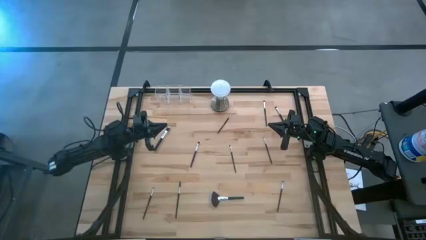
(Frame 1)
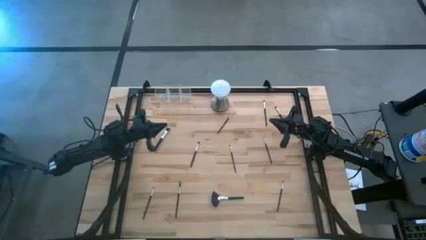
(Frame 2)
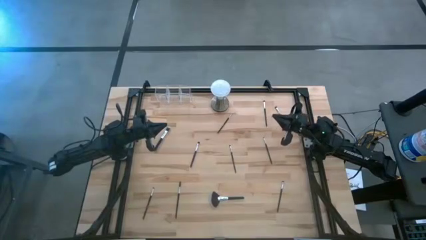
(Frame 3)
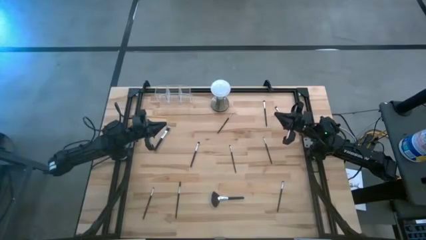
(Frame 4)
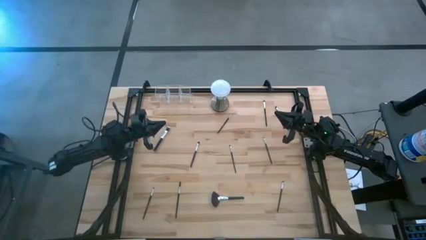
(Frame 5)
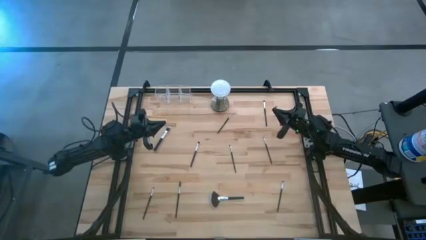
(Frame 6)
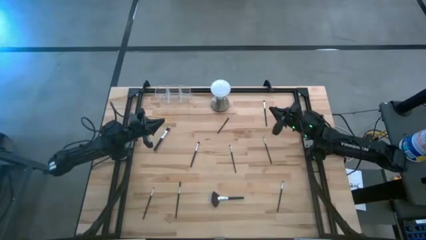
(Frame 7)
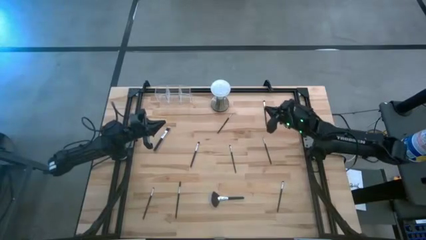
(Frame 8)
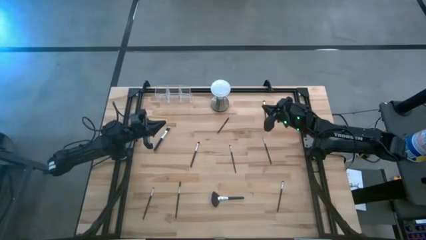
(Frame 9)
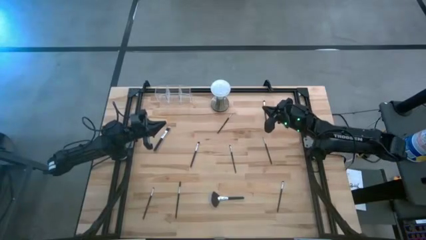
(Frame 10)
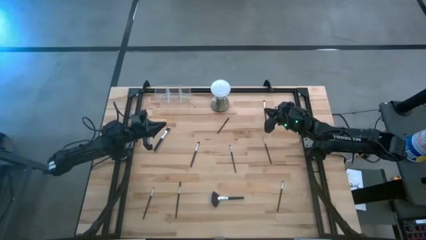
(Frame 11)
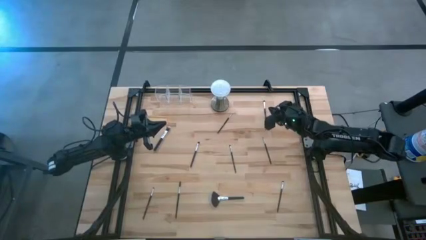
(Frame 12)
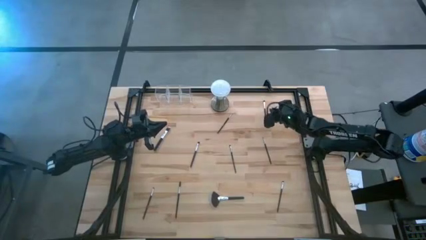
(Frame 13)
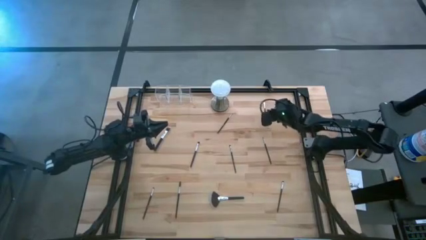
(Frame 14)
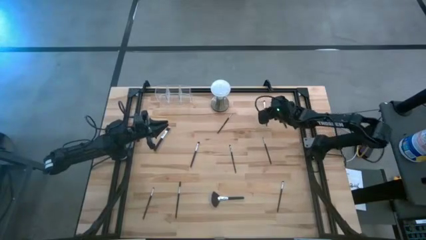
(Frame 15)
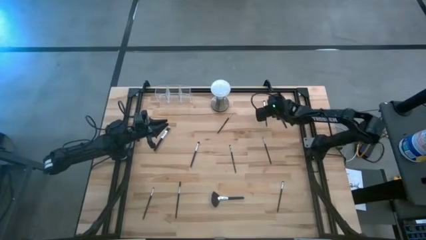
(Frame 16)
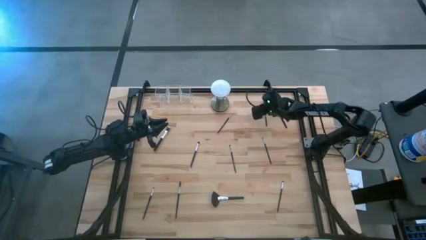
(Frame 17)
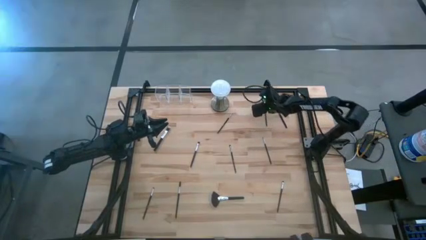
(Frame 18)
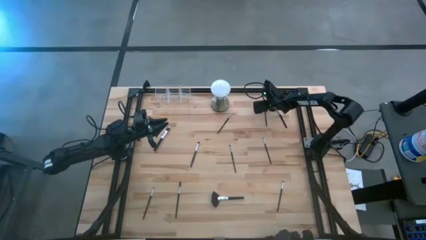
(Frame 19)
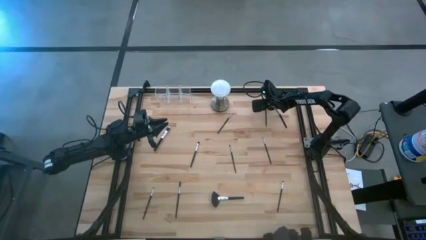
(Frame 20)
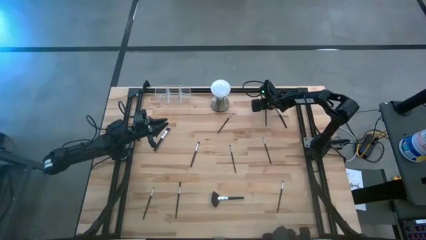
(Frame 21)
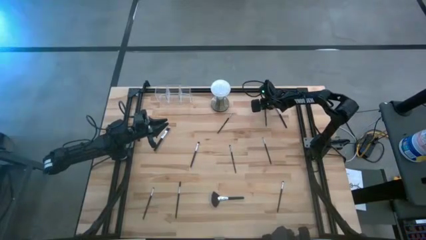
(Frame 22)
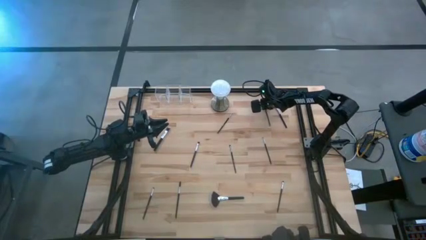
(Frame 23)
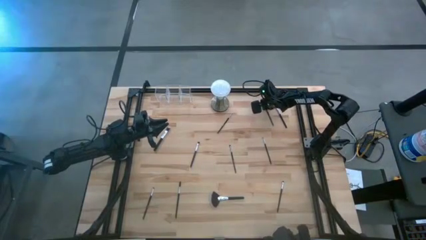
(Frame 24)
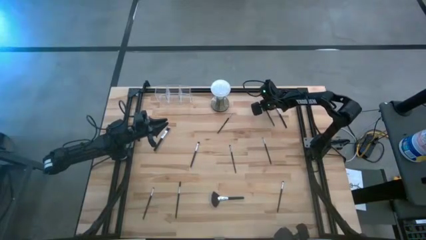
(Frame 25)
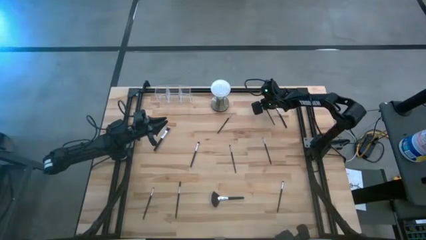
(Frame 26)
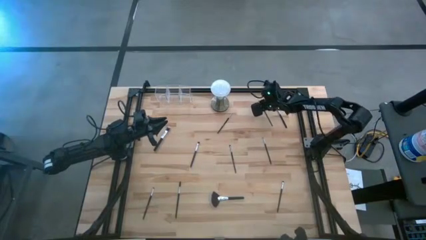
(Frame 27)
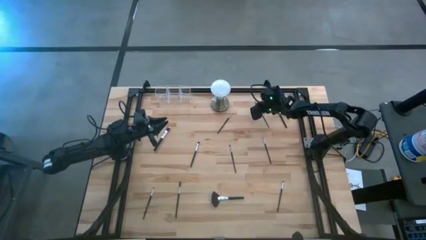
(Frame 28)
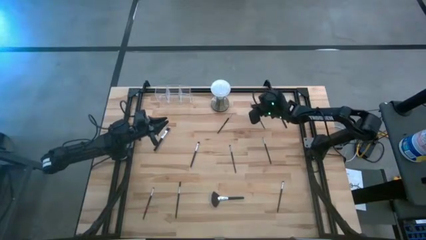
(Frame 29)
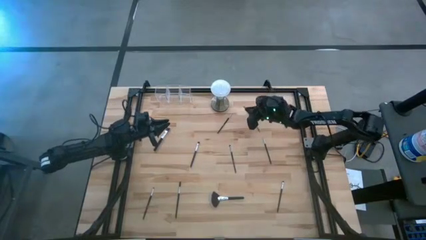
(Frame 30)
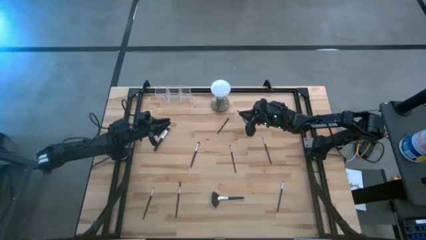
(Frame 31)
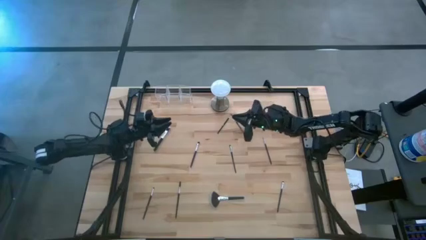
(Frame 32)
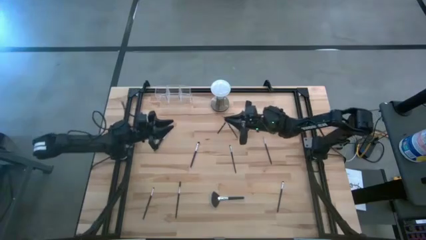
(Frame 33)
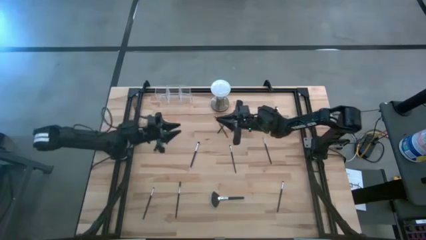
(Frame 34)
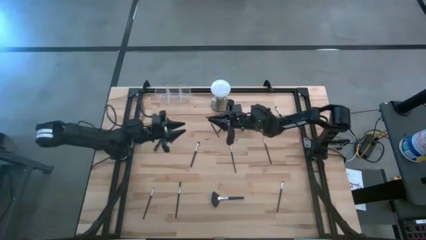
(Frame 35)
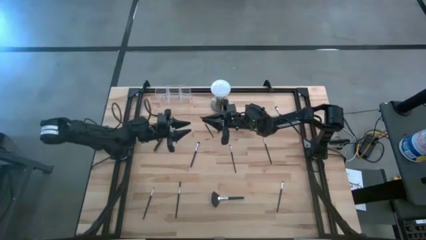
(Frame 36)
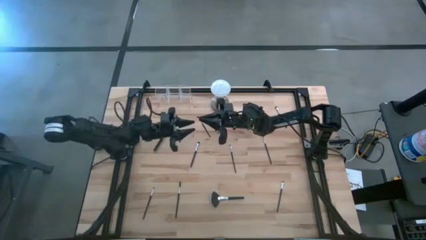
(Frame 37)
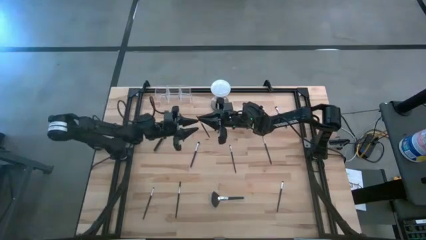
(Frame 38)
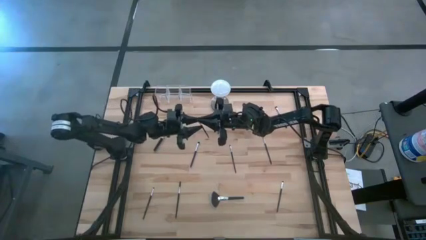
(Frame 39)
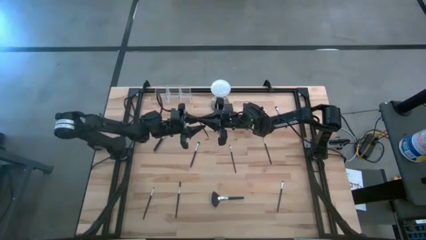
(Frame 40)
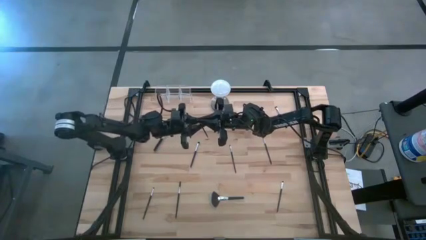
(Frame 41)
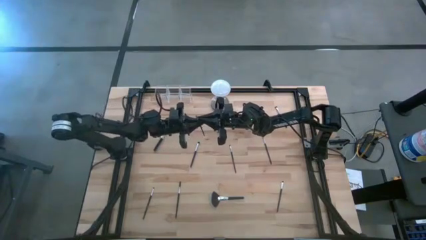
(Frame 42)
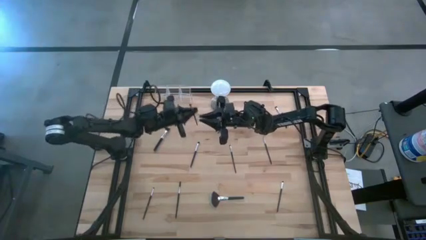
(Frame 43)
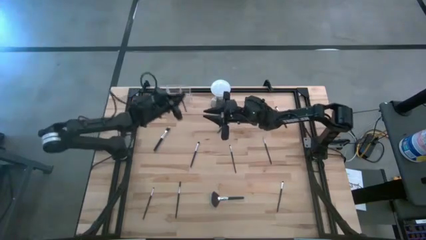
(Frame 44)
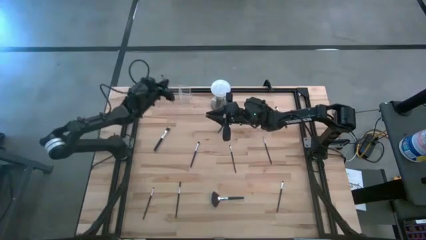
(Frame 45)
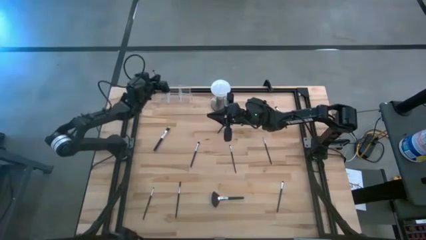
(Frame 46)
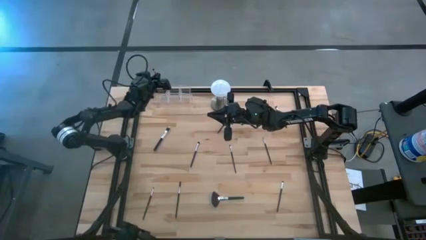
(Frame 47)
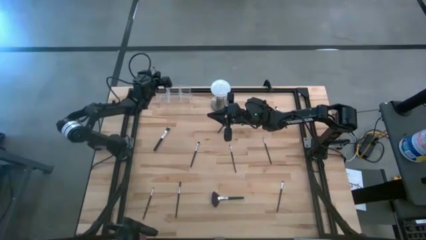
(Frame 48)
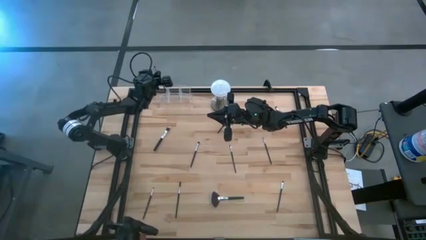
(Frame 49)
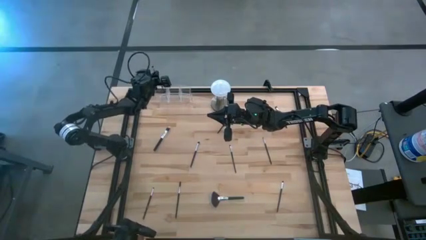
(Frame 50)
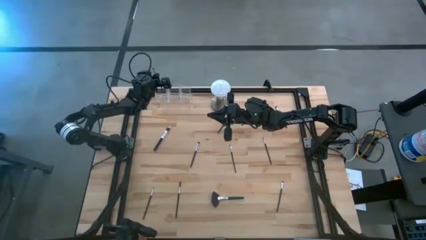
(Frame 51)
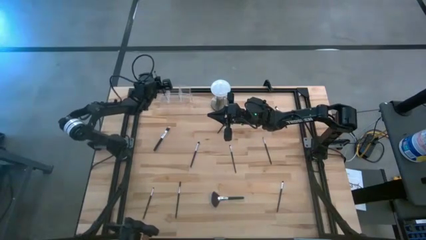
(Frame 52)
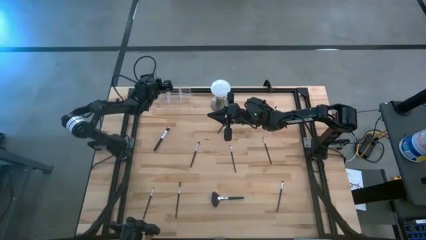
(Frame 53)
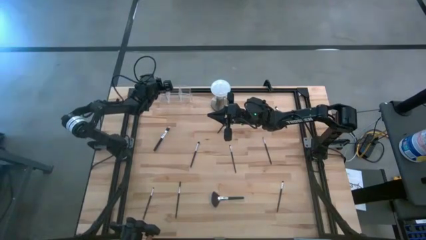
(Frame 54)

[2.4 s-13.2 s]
Task: Put items in baskets/containers
Put the eyeshadow brush into the left section of the transparent organizer

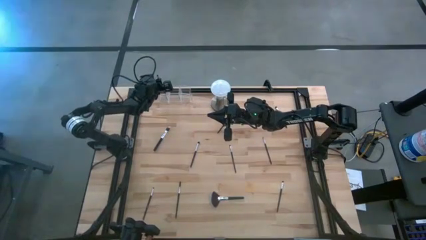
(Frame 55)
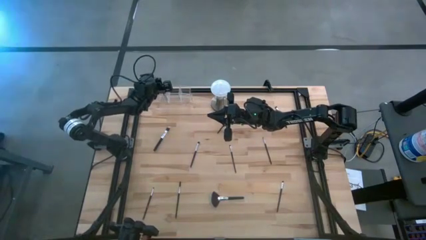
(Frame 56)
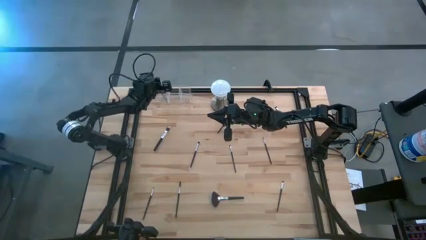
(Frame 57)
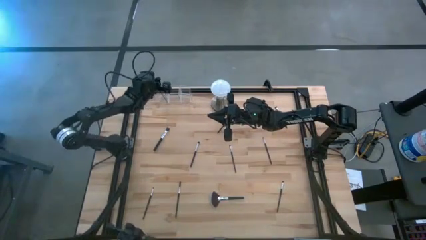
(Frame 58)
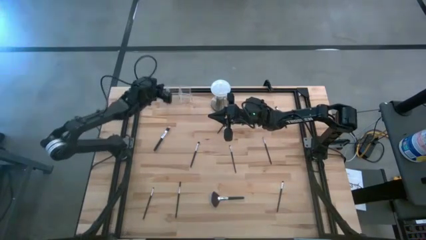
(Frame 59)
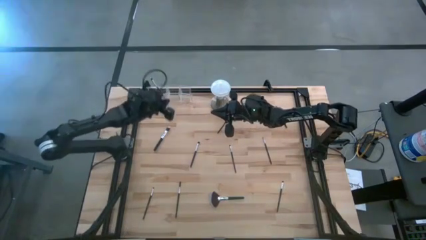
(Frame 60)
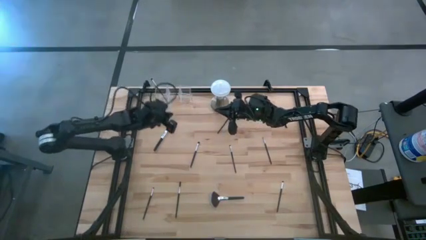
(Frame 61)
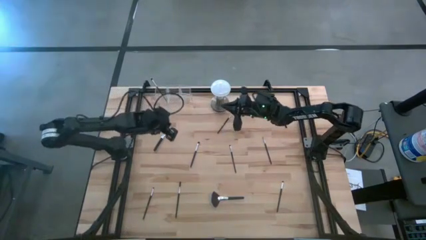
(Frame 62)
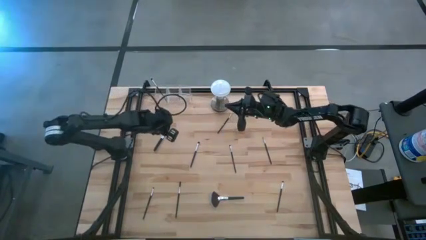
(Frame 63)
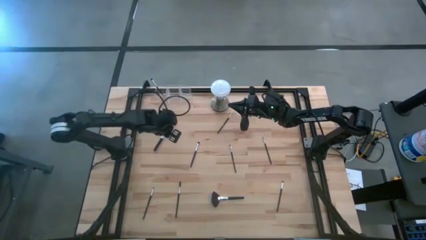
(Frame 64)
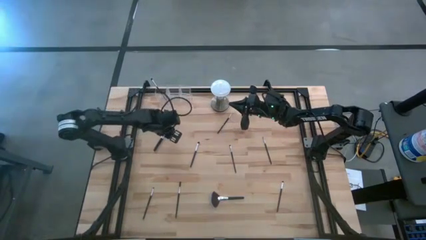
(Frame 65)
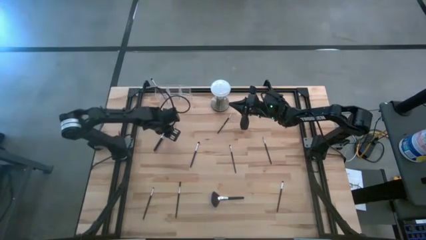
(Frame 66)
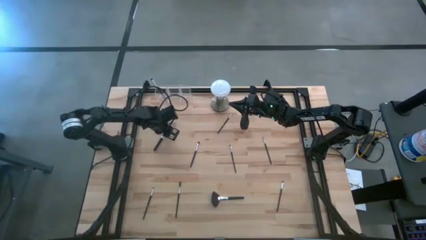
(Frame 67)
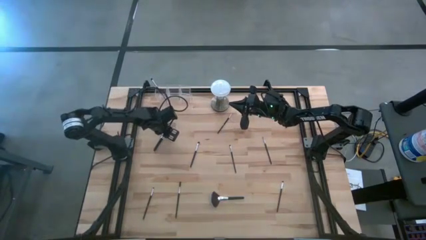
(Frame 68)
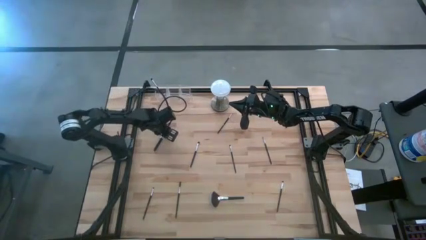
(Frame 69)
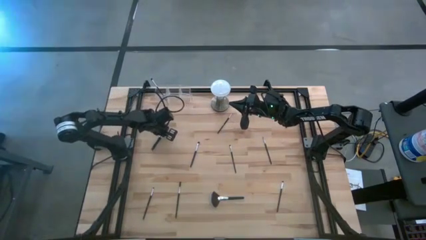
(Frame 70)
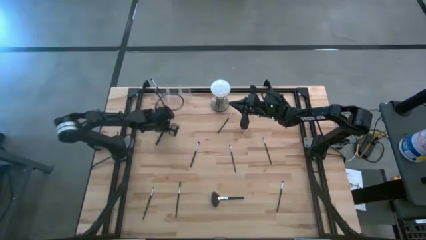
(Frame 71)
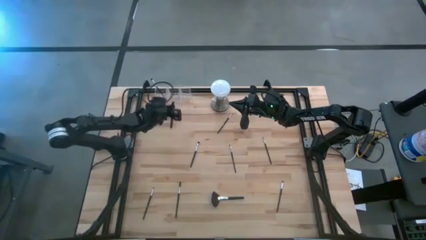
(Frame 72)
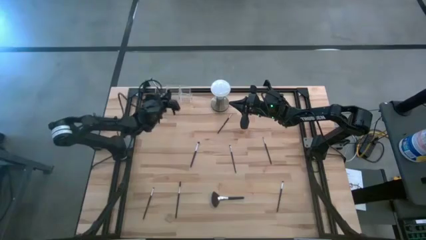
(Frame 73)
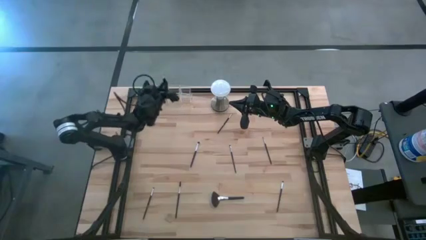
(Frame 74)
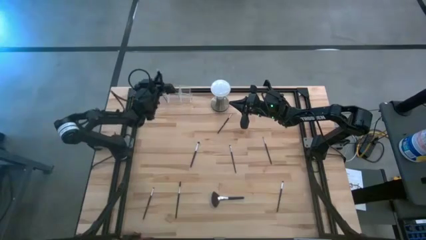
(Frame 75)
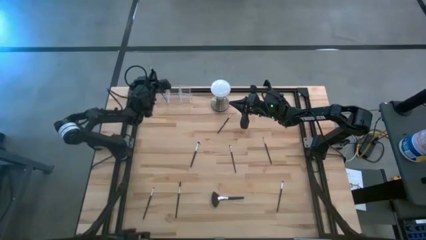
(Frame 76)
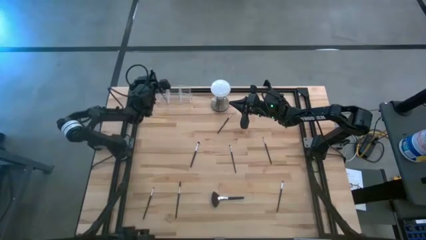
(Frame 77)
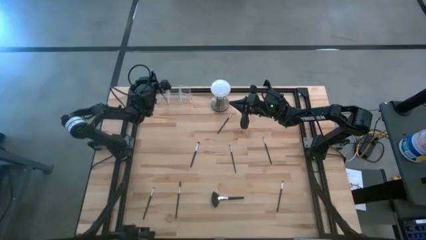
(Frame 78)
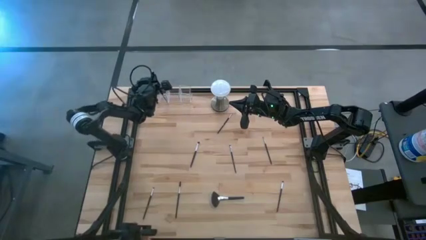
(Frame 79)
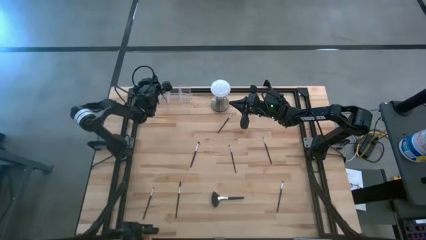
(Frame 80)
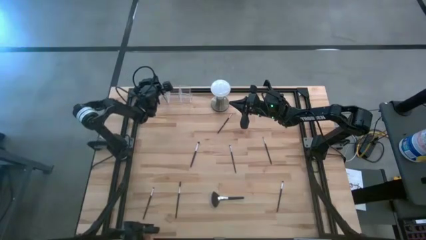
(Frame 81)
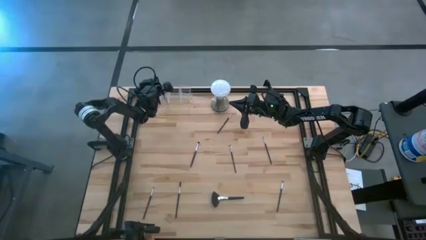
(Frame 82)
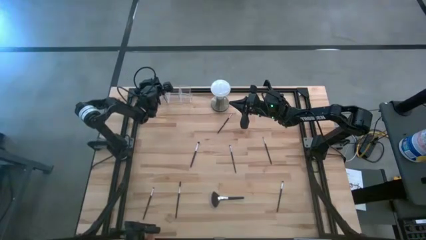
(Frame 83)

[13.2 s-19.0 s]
Put the blush brush into the left section of the transparent organizer
